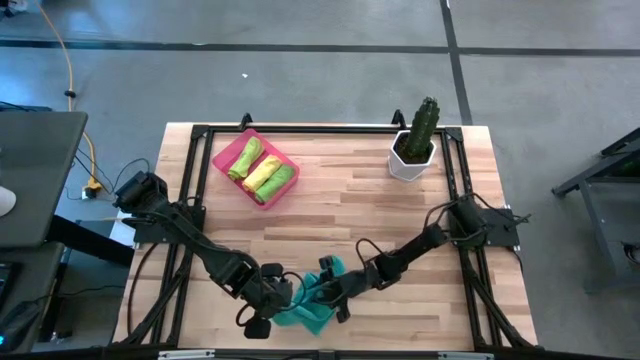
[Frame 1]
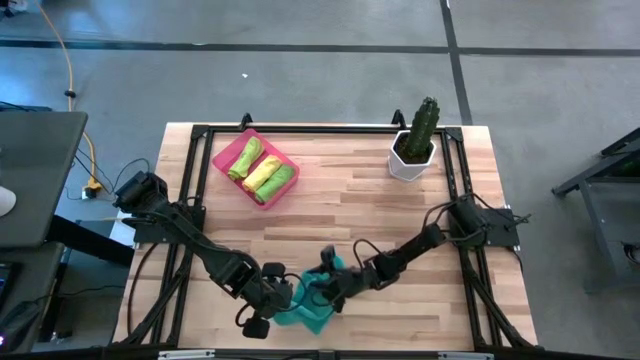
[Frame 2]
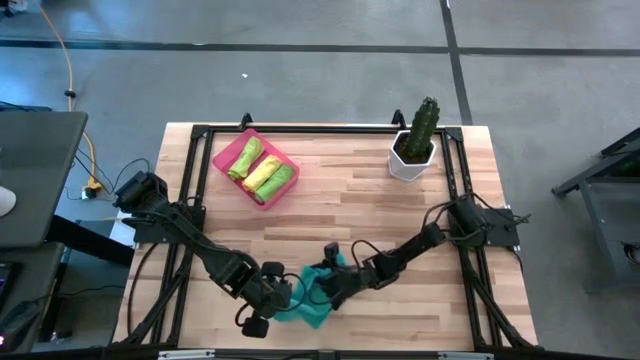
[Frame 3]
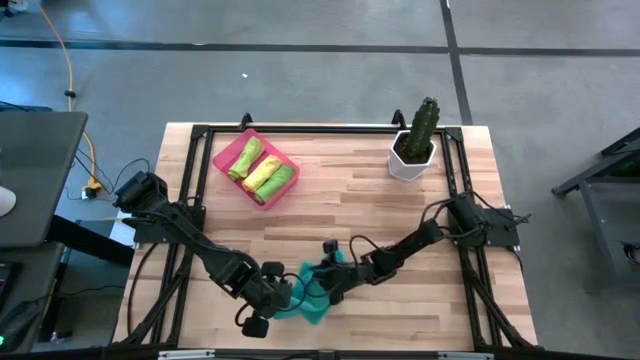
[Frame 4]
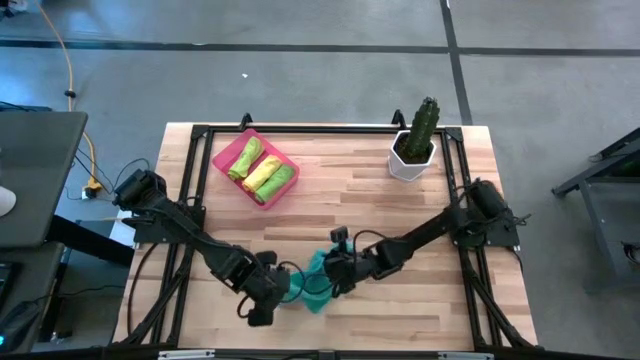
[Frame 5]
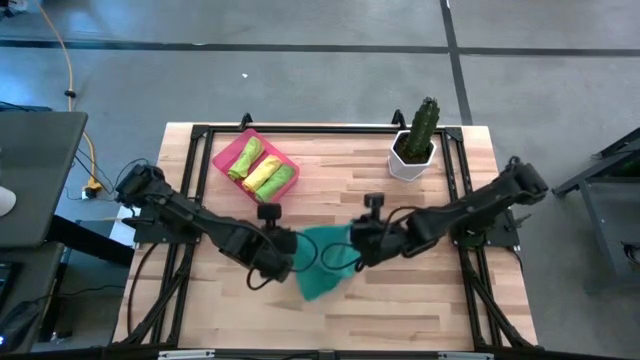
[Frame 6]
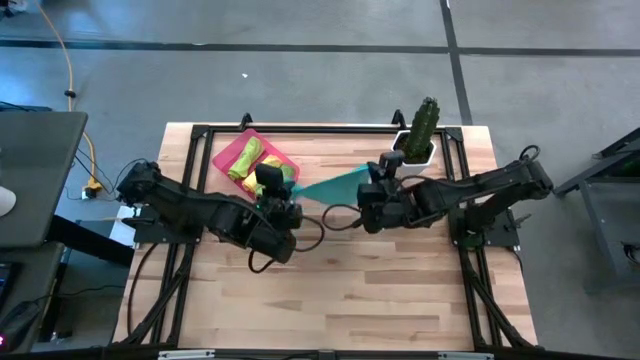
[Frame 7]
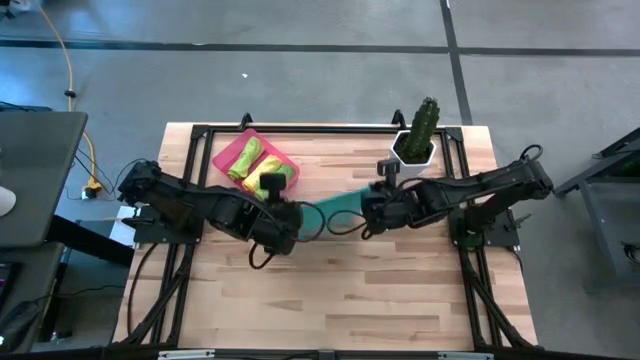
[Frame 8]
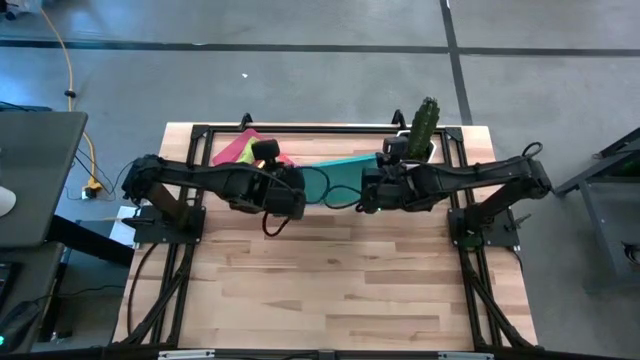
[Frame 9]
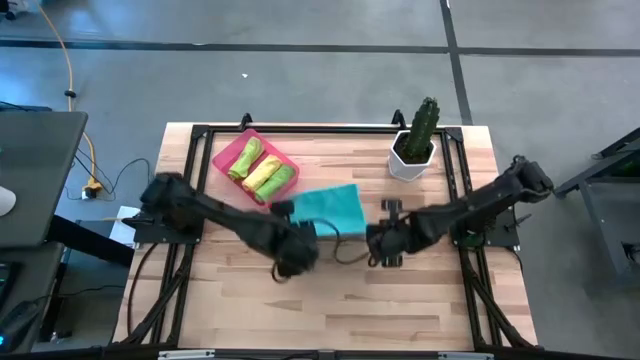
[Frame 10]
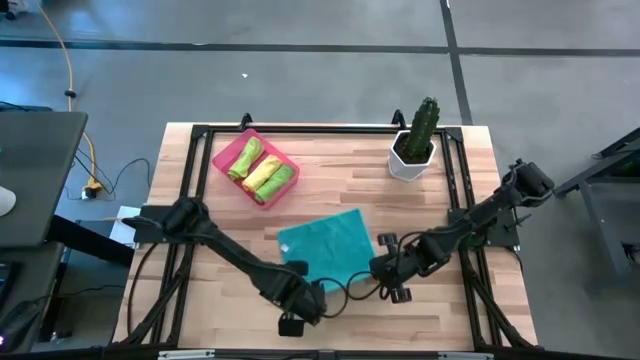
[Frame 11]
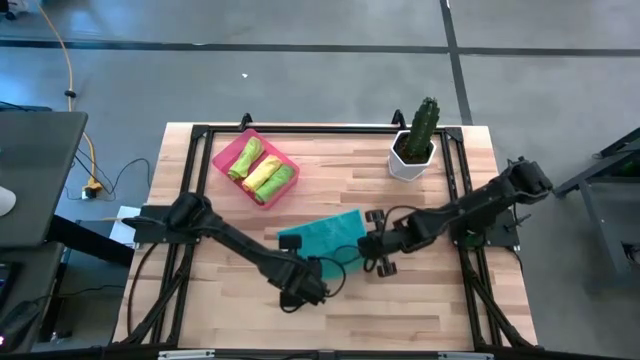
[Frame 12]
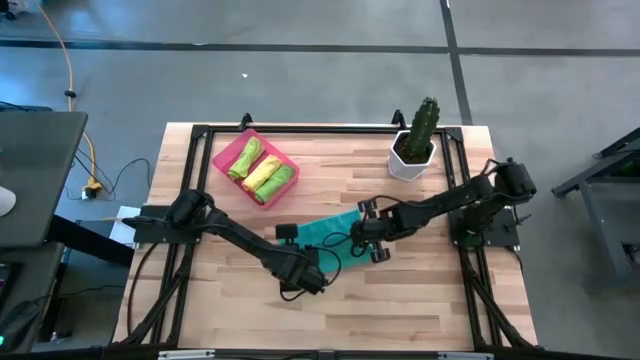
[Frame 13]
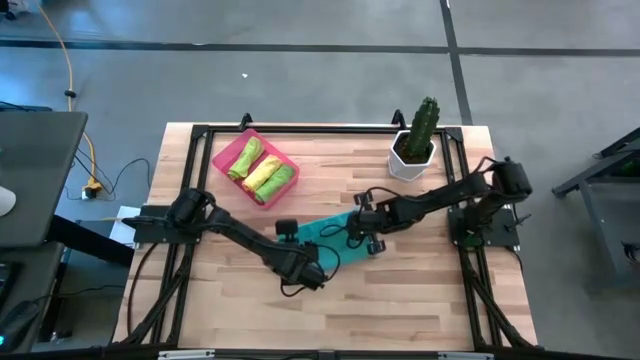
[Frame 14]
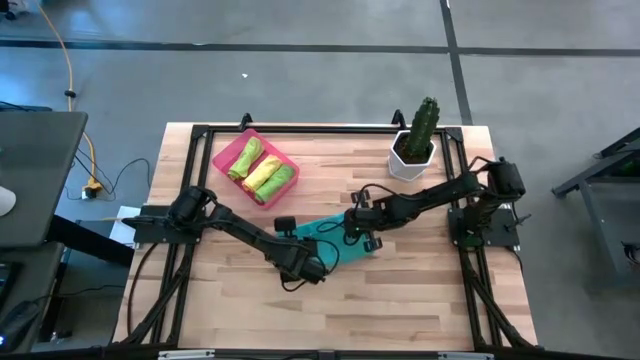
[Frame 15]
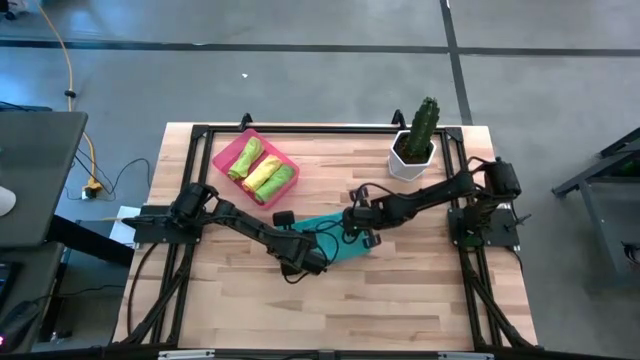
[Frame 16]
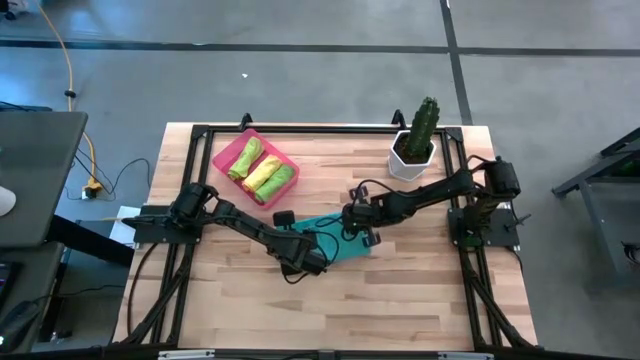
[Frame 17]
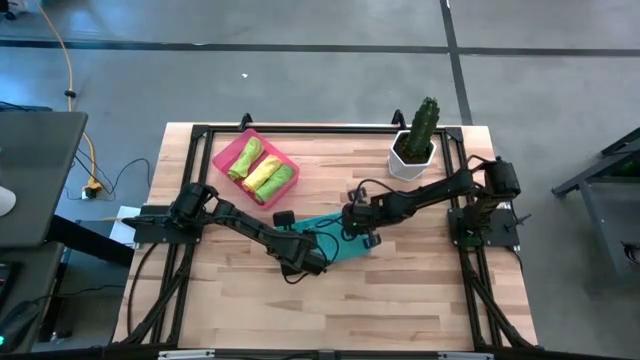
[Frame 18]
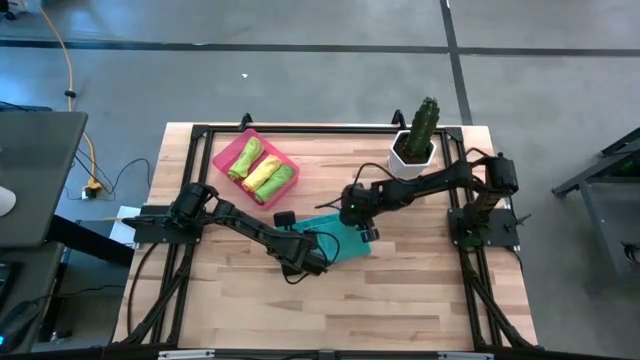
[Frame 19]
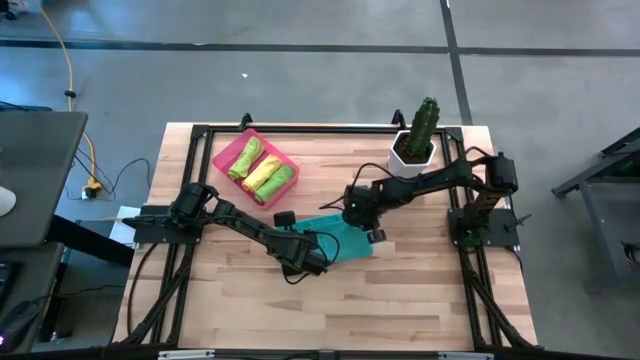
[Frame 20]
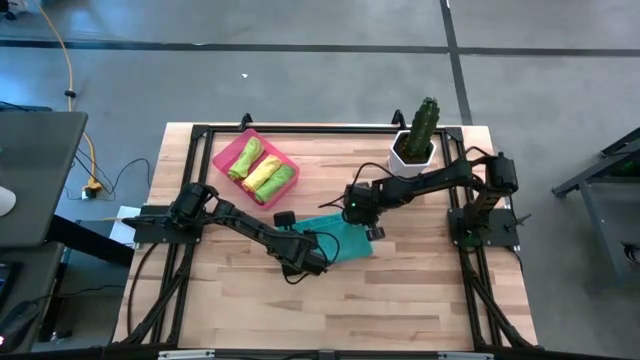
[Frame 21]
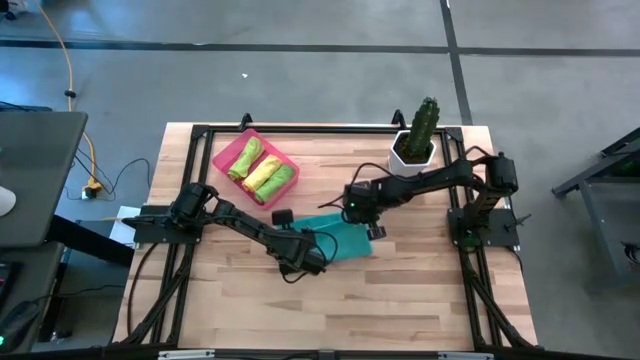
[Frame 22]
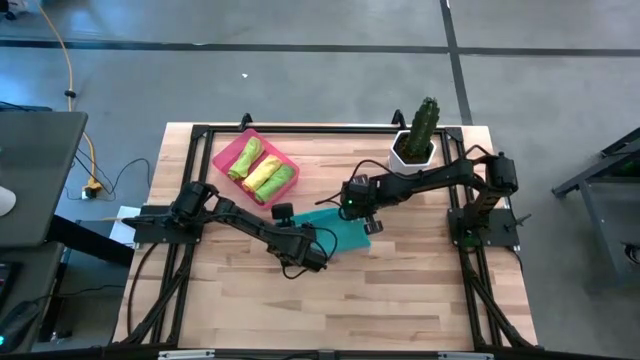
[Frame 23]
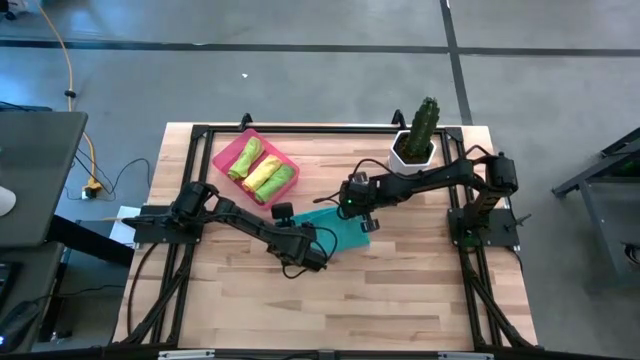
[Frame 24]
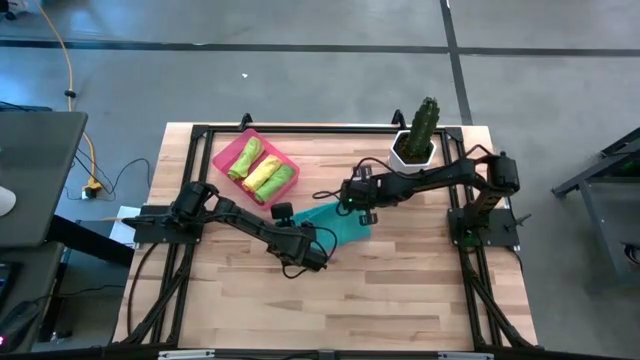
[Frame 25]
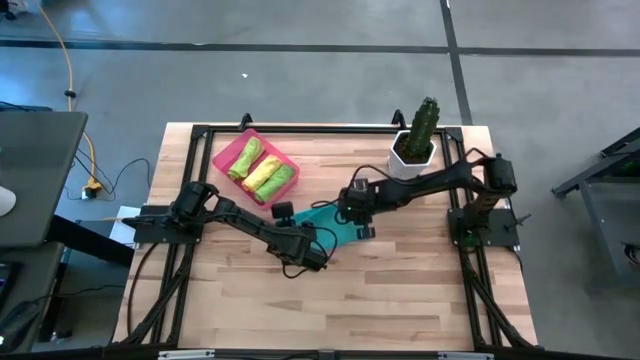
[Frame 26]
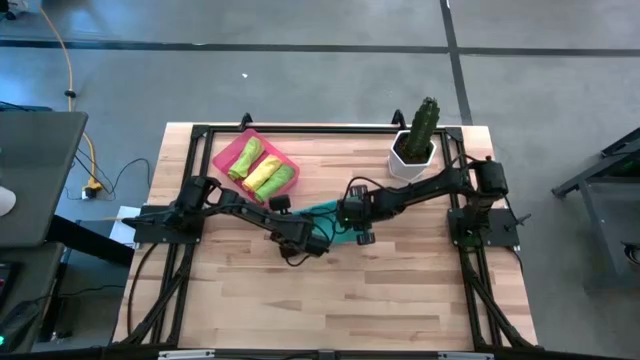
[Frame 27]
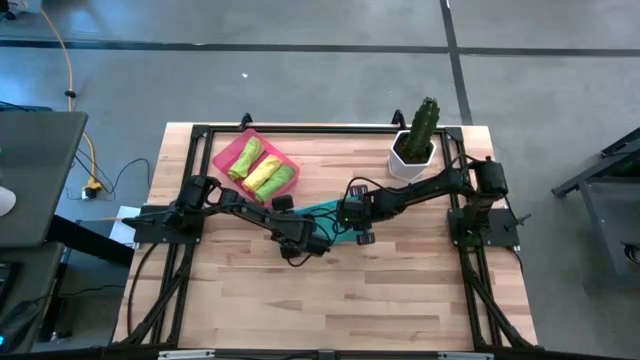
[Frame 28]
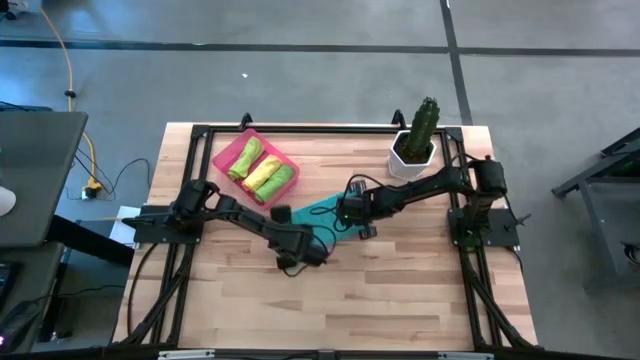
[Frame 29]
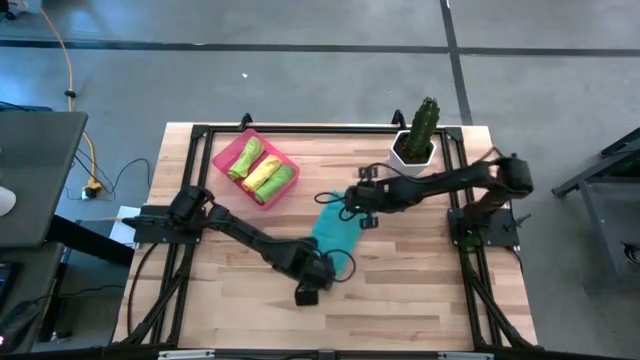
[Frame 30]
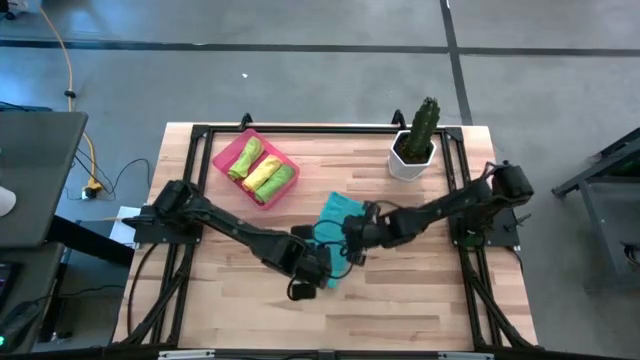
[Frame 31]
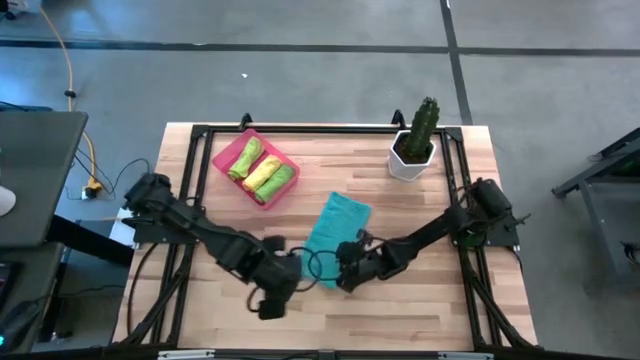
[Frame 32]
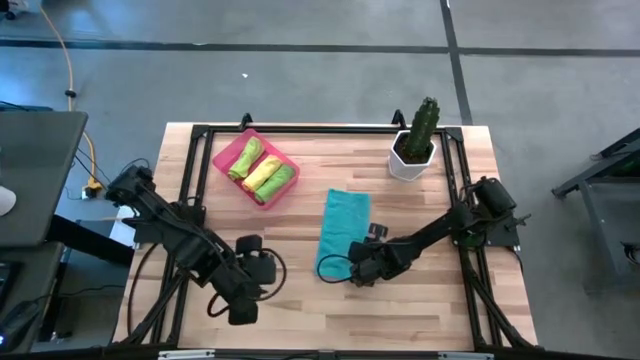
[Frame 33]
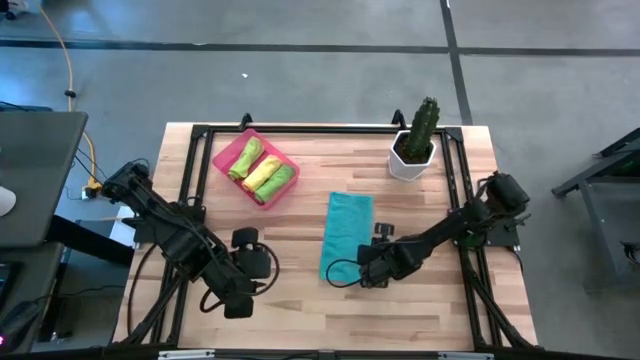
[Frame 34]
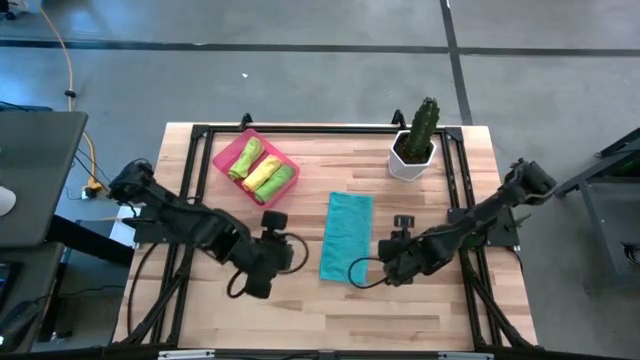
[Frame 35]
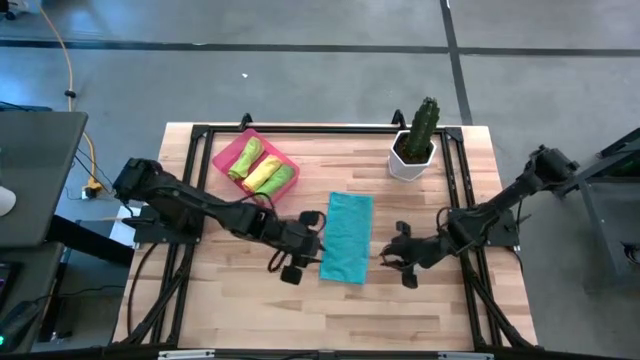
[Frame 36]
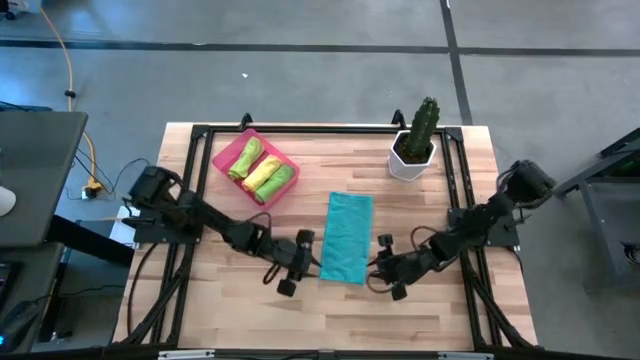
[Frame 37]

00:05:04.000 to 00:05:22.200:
Task: Roll microfiber towels into tight, uniform cylinder then place into a basket
Roll the blue microfiber cloth

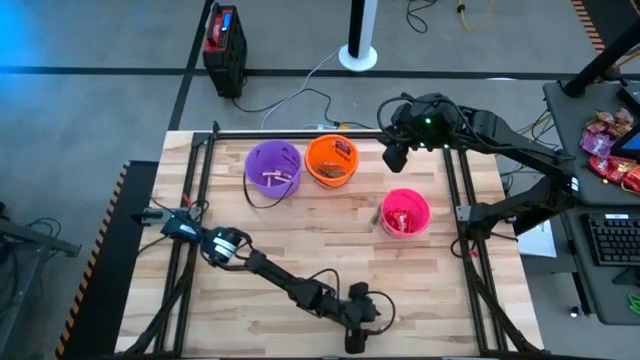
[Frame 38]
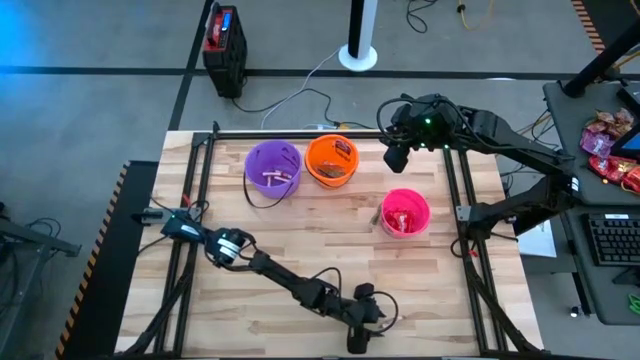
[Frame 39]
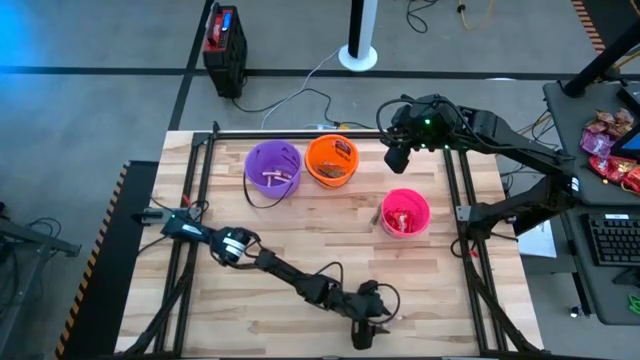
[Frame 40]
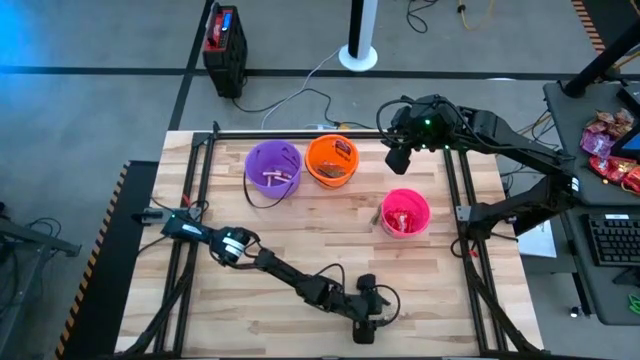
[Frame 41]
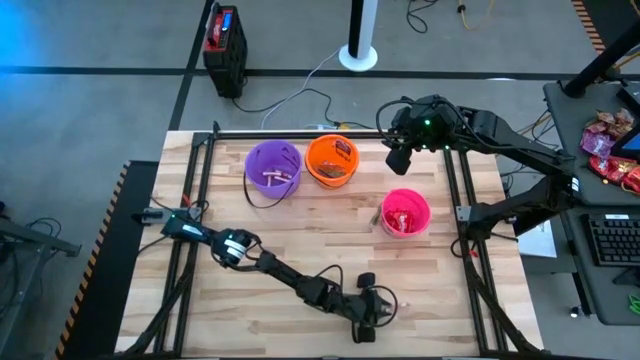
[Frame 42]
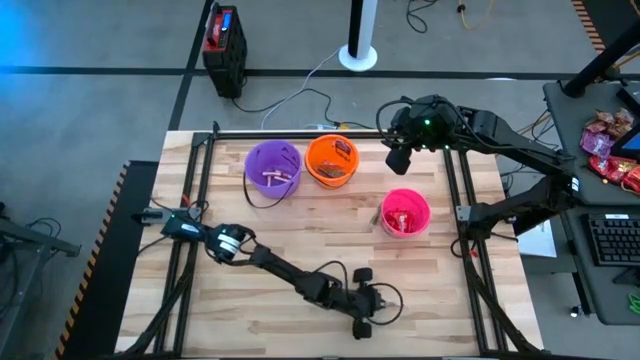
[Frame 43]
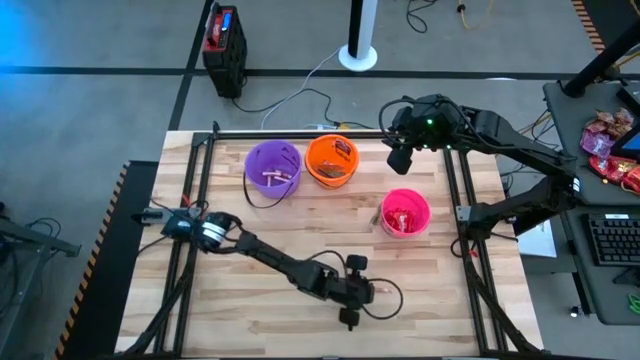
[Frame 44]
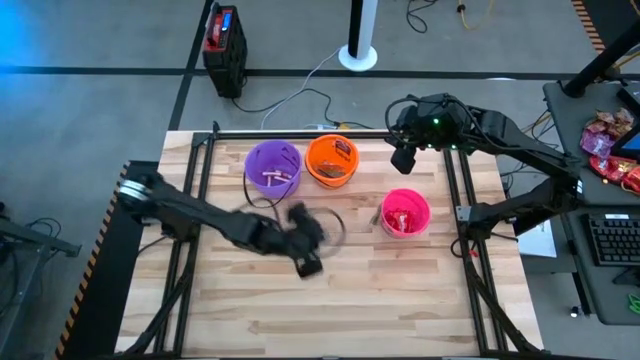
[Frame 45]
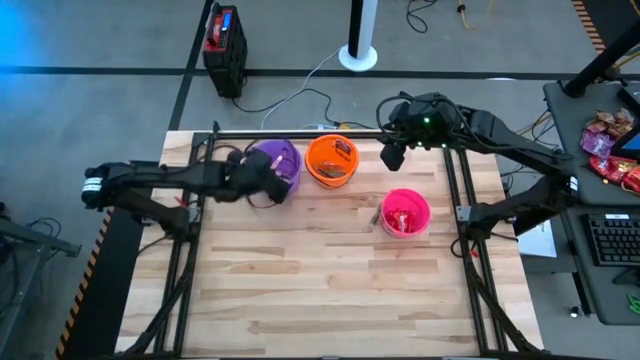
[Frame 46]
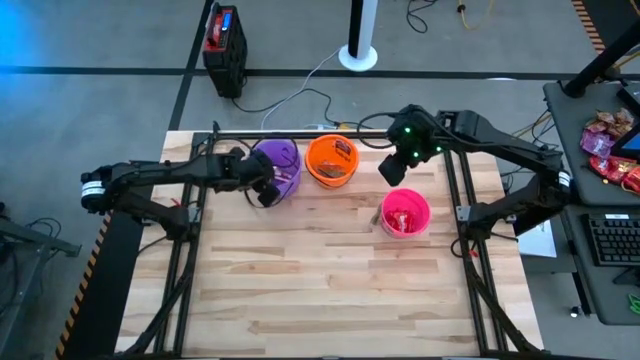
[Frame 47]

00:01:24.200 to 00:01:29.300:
Task: Sort candy by brand, put in halloween buckets
Put the white candy into the violet bucket
